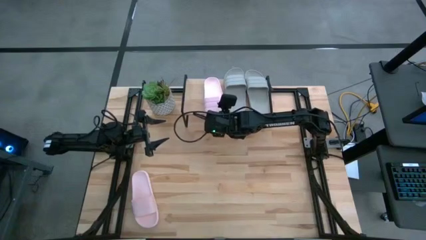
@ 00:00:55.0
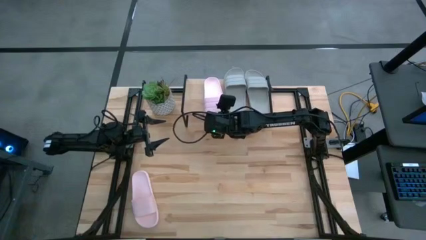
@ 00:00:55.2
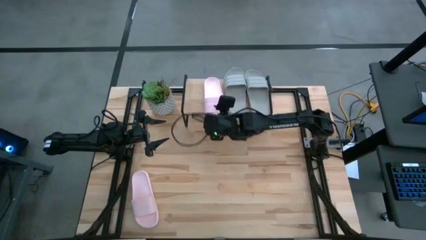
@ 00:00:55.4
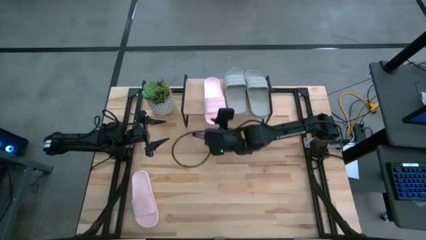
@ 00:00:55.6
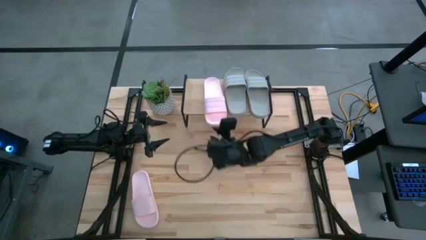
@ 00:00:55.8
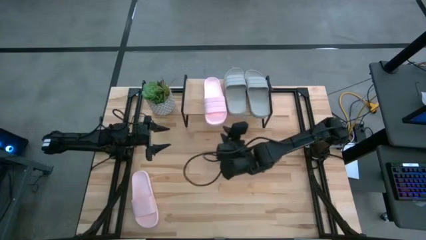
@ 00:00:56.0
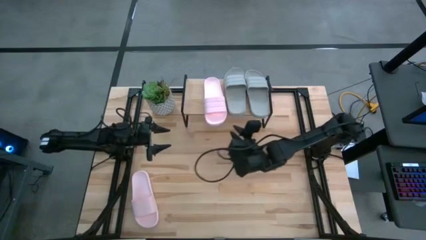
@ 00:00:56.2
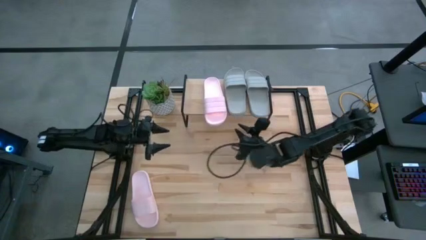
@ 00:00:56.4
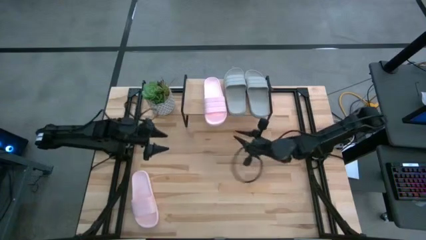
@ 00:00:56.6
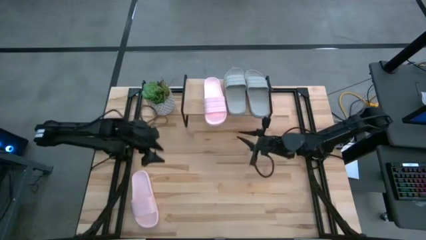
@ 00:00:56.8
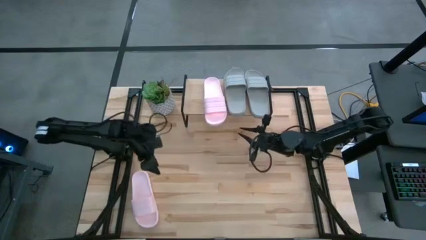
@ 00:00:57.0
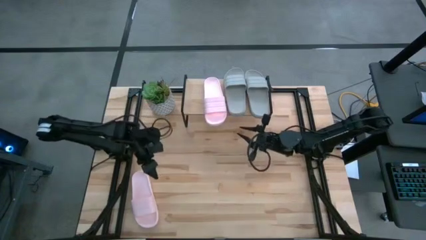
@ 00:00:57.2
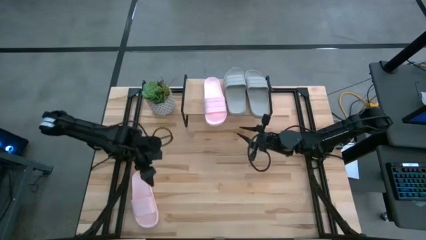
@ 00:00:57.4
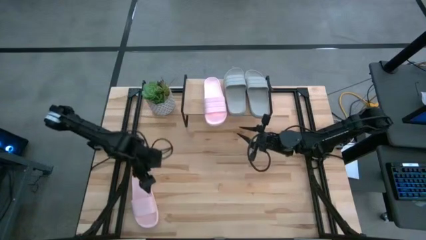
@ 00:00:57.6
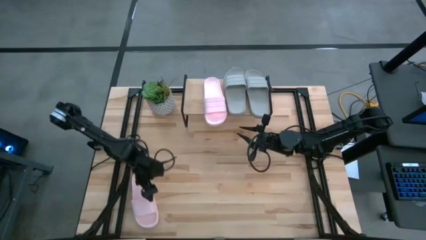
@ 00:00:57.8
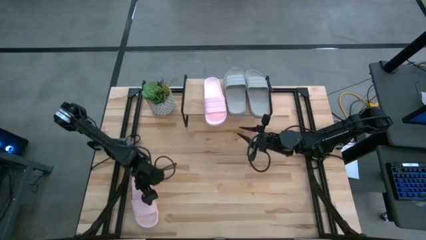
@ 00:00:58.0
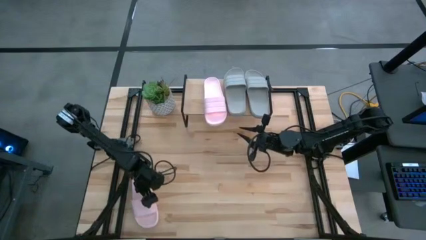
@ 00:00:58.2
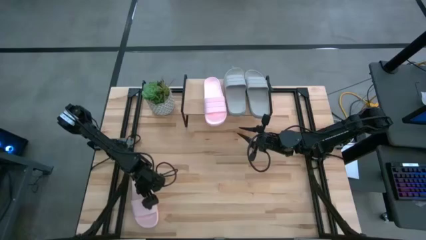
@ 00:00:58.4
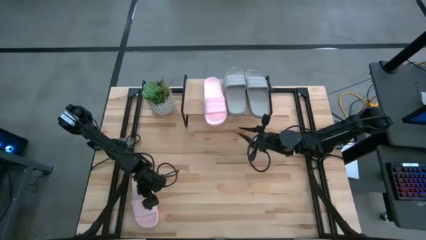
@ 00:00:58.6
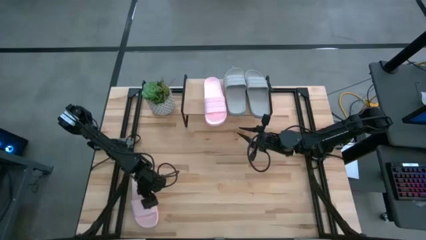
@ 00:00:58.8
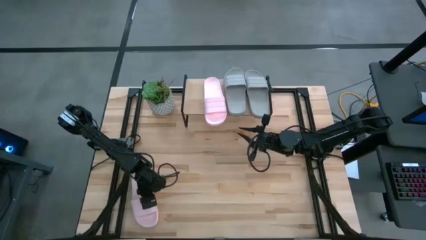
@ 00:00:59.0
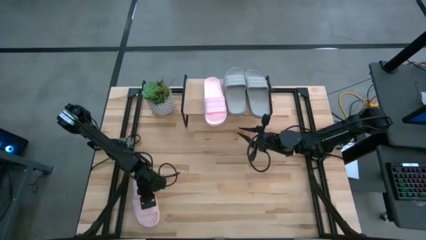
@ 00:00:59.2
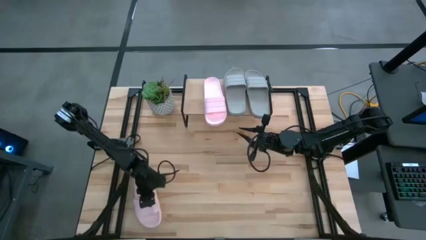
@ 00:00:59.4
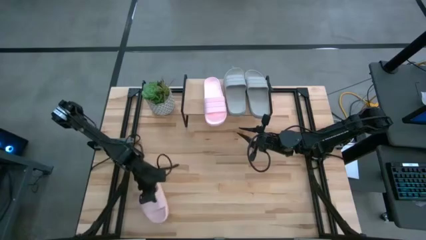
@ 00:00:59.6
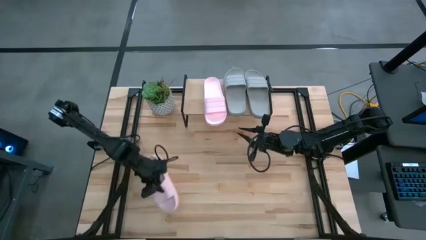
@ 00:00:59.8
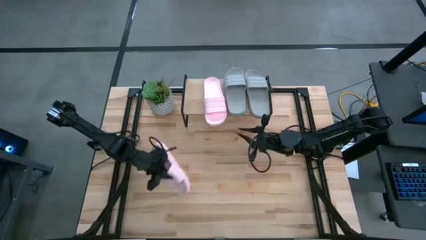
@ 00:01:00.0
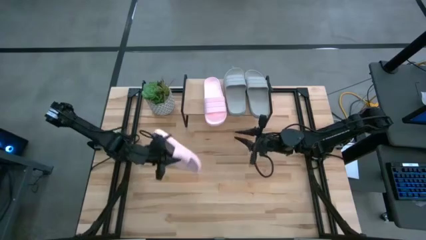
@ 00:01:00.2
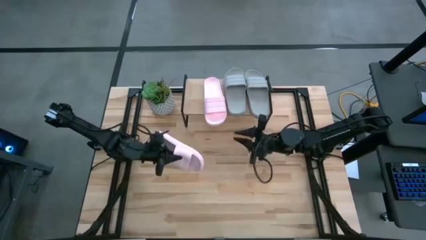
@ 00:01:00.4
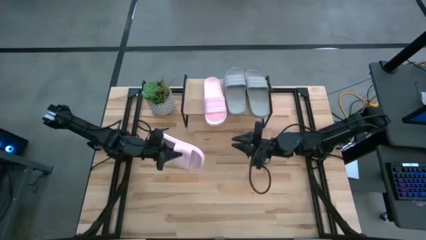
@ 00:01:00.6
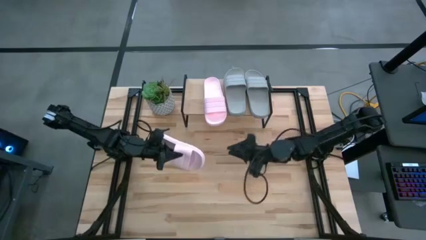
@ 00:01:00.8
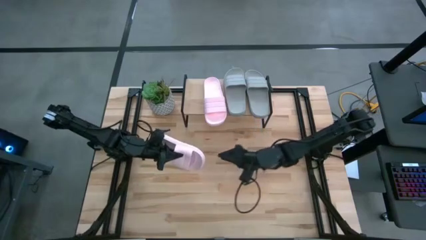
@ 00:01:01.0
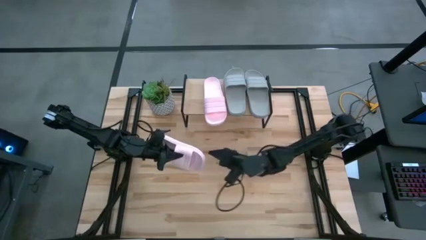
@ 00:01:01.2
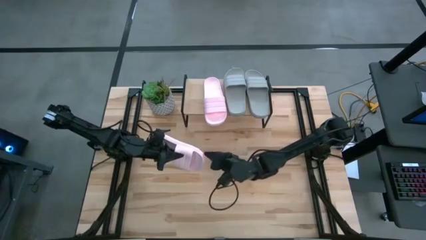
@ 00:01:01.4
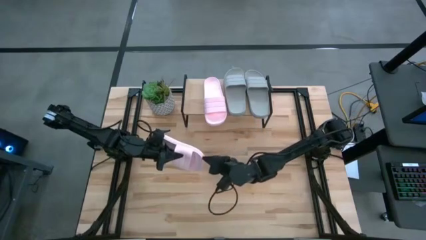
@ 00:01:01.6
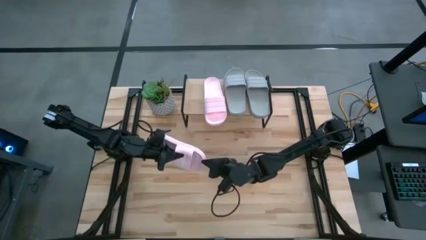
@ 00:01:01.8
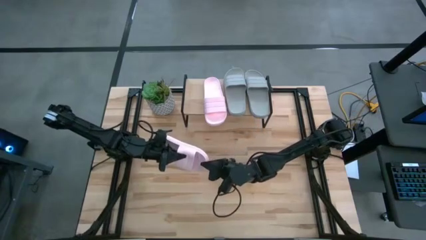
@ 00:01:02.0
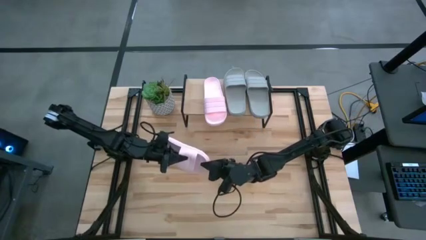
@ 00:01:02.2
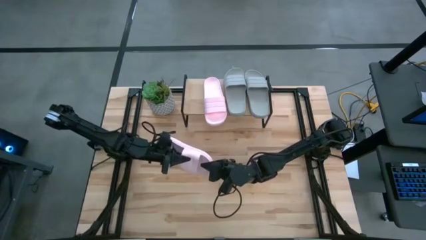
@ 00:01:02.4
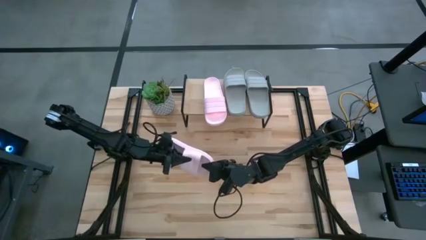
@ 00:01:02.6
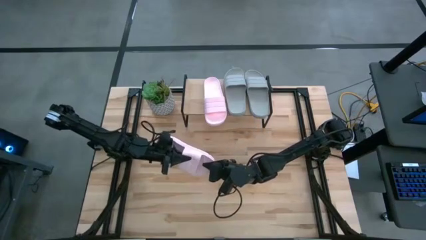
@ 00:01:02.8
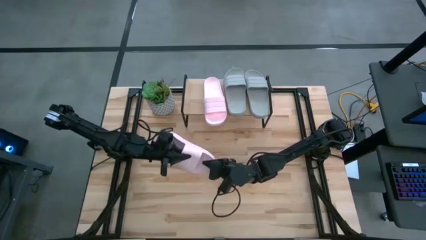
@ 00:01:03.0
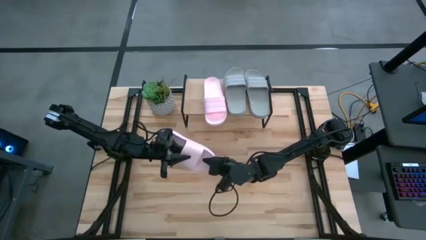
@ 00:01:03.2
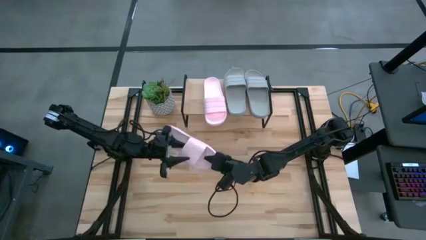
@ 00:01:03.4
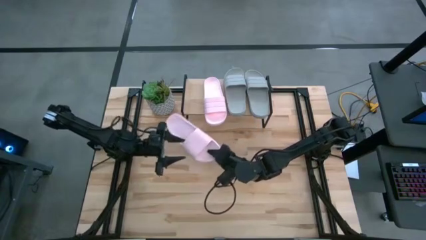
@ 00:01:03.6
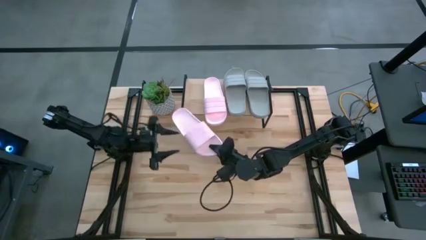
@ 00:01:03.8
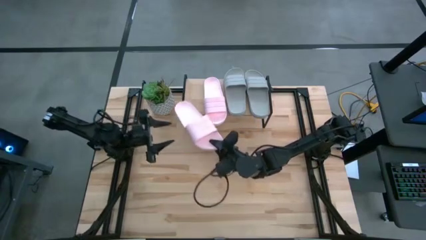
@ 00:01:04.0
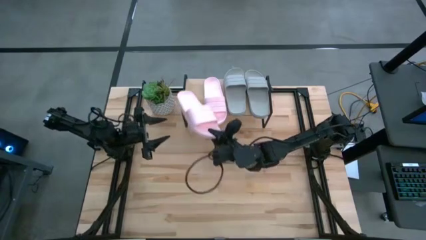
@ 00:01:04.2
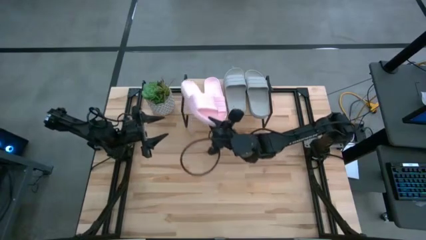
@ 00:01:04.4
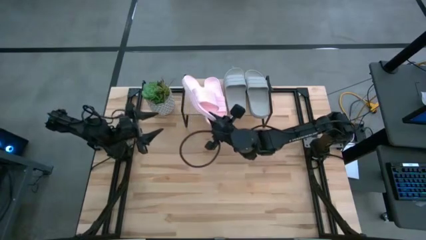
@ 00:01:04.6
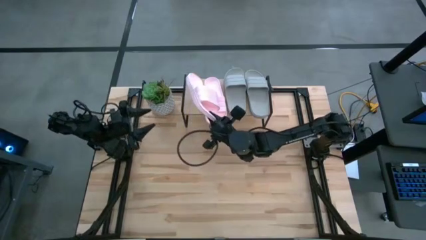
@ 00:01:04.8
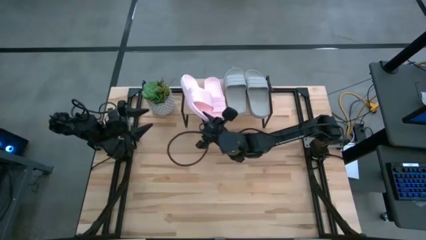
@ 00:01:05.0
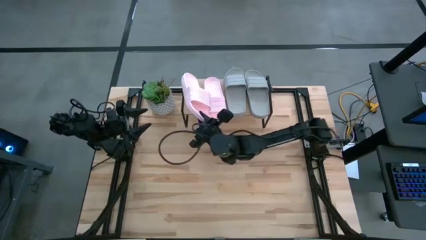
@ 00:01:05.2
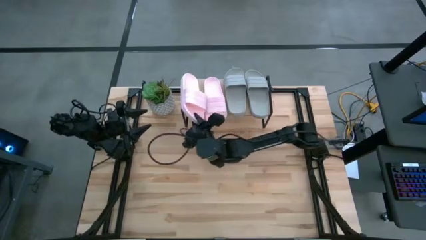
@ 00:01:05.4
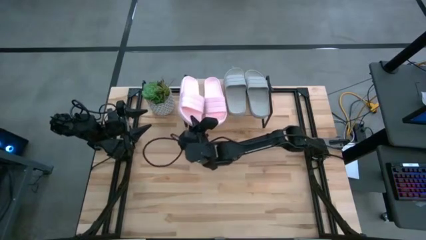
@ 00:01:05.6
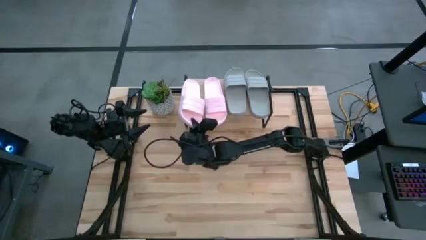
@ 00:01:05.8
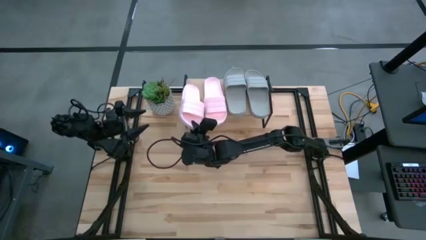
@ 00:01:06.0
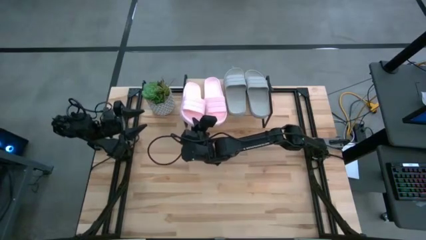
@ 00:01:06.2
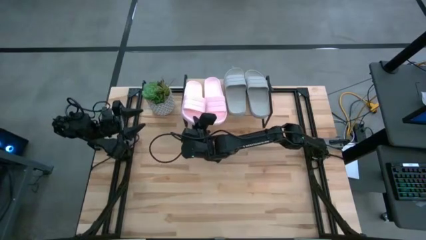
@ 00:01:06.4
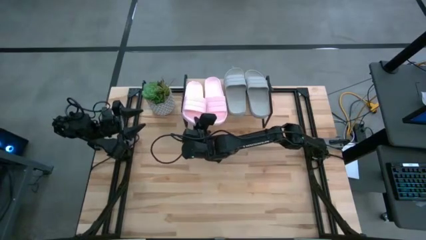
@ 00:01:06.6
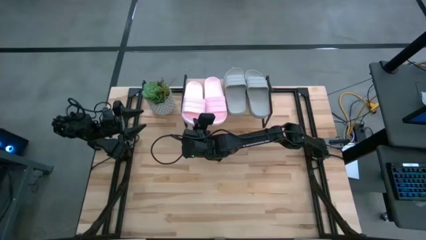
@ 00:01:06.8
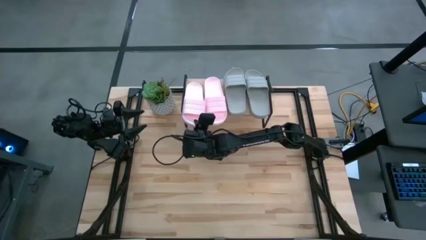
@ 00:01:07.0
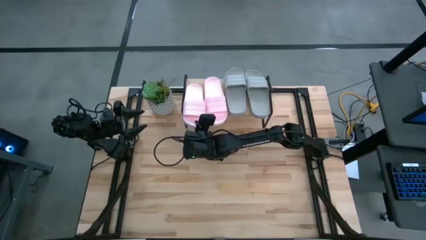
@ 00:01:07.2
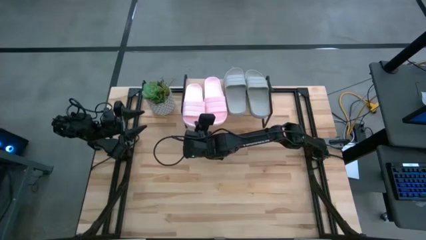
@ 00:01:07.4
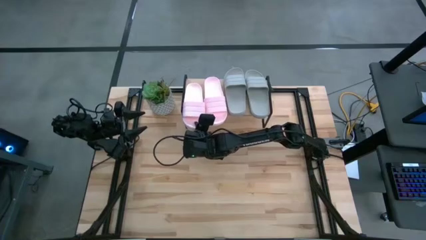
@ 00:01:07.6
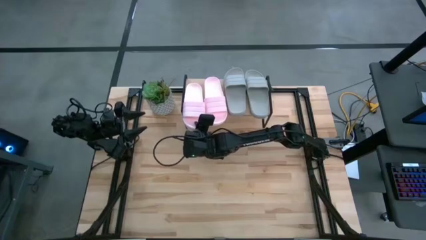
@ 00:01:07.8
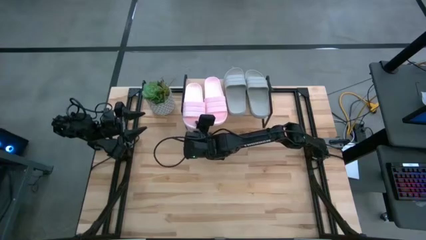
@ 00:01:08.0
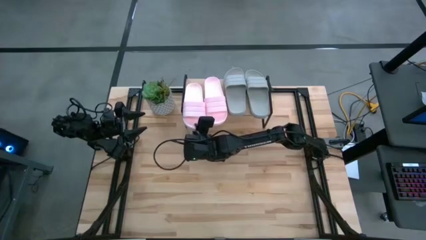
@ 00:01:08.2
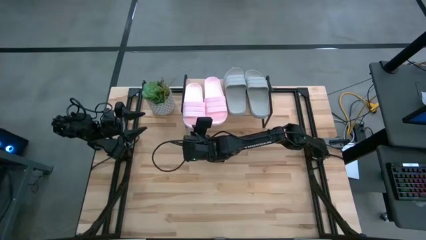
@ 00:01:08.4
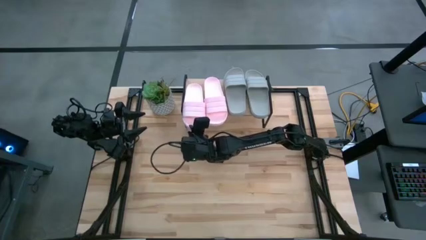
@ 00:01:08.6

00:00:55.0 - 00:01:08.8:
Task: Pick and place slides into the shelf
Put the pink slide on the shelf
